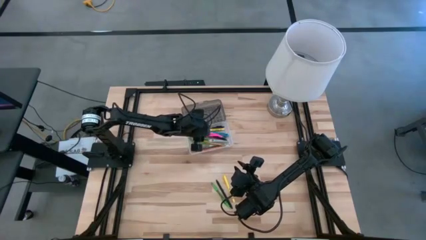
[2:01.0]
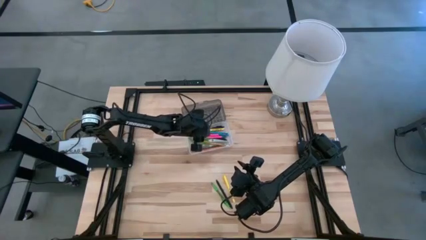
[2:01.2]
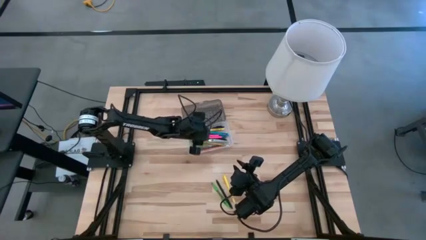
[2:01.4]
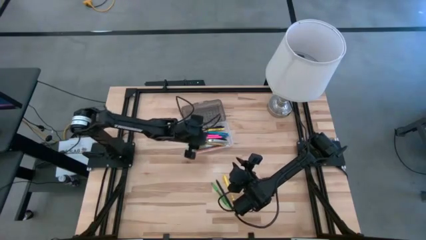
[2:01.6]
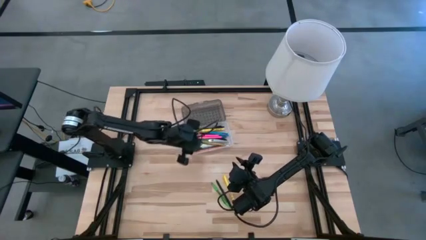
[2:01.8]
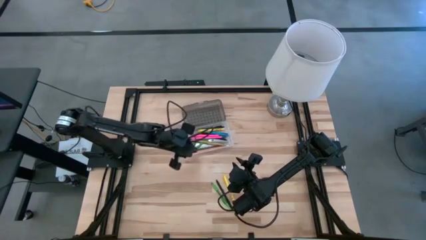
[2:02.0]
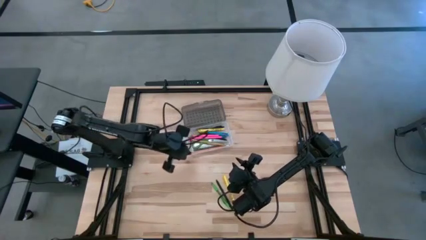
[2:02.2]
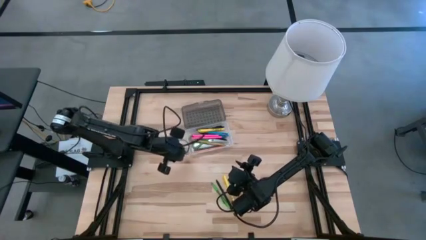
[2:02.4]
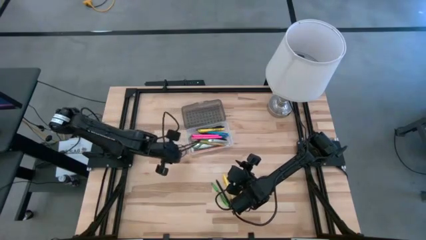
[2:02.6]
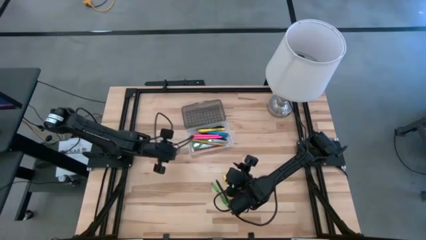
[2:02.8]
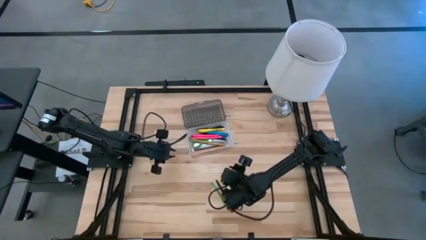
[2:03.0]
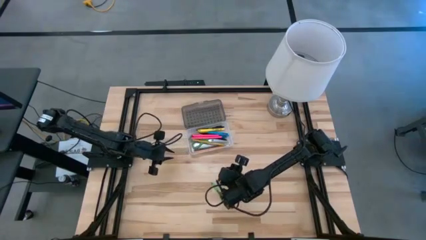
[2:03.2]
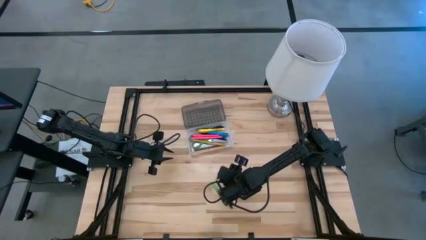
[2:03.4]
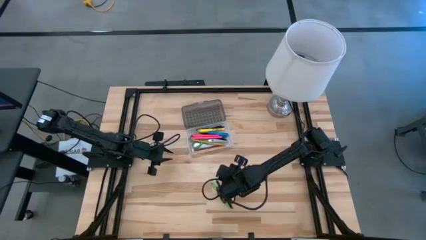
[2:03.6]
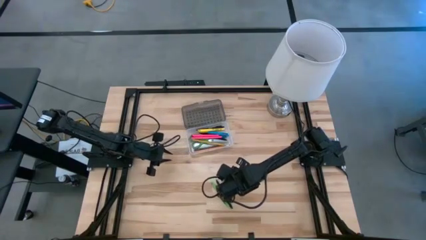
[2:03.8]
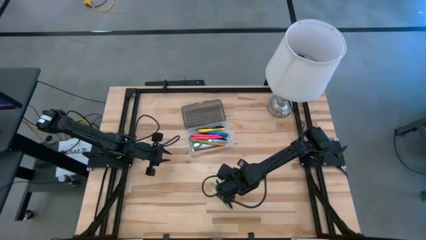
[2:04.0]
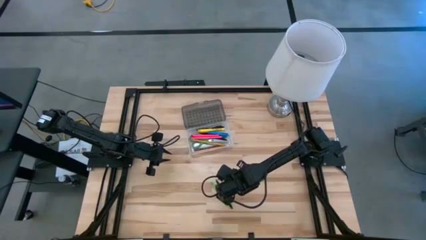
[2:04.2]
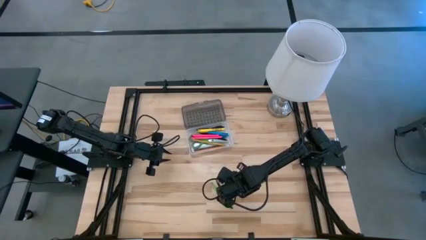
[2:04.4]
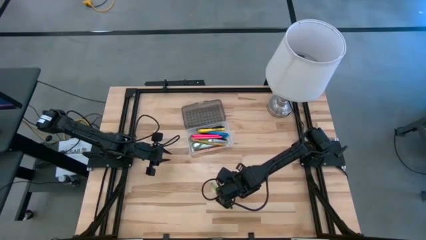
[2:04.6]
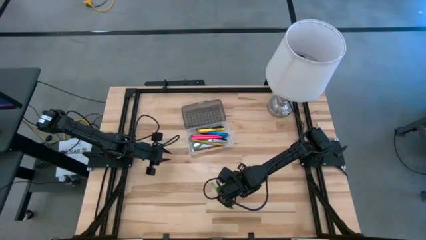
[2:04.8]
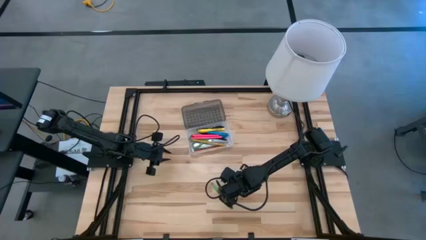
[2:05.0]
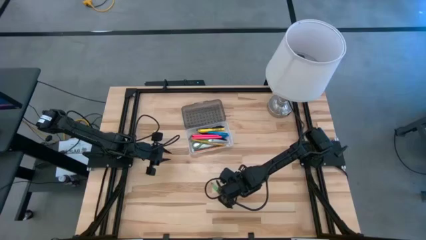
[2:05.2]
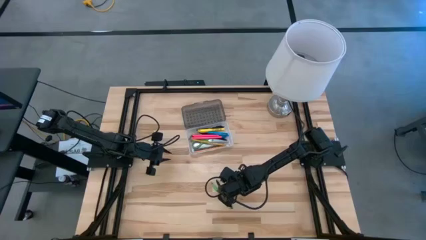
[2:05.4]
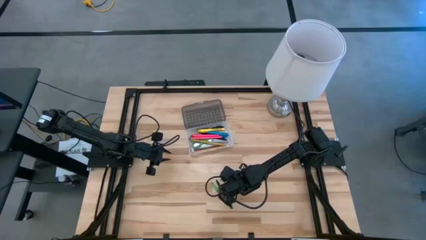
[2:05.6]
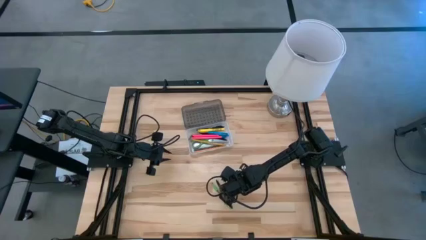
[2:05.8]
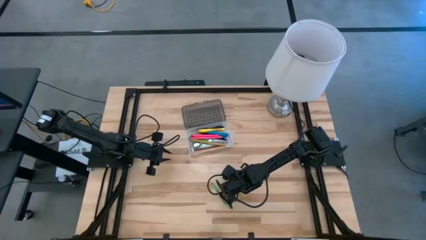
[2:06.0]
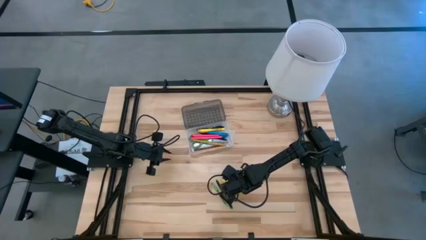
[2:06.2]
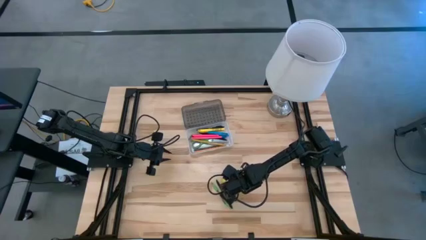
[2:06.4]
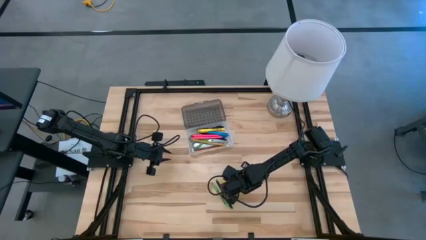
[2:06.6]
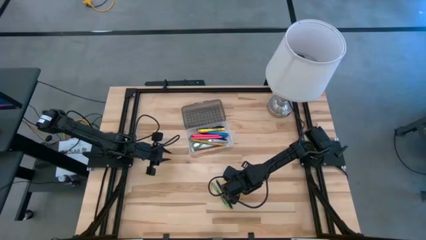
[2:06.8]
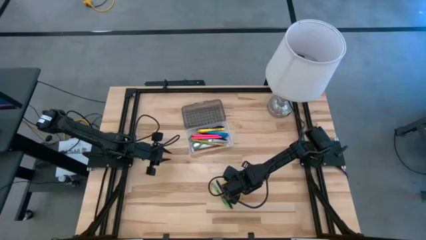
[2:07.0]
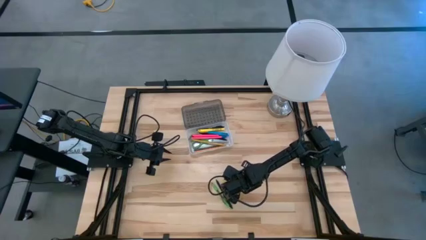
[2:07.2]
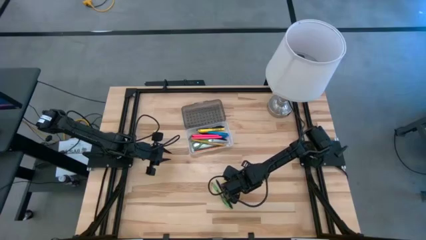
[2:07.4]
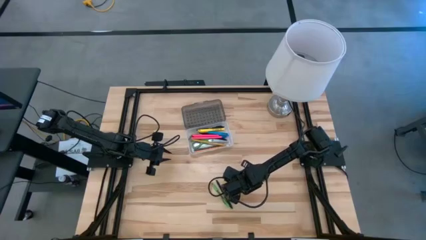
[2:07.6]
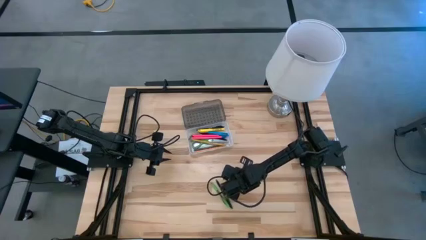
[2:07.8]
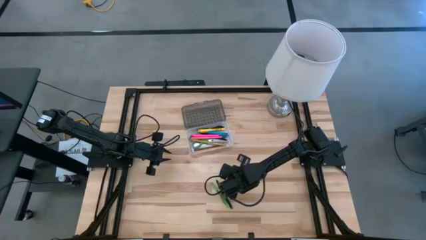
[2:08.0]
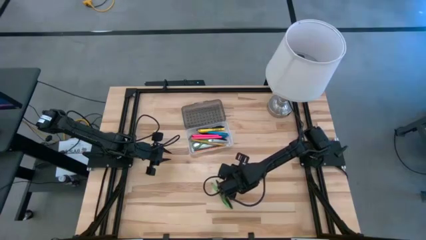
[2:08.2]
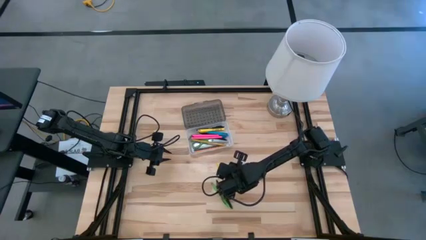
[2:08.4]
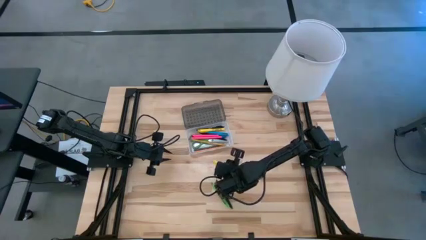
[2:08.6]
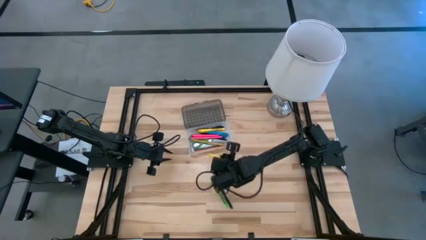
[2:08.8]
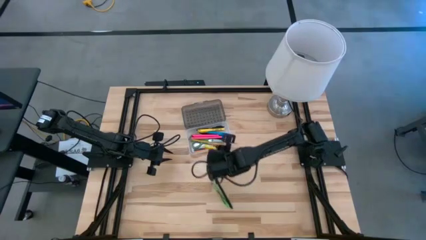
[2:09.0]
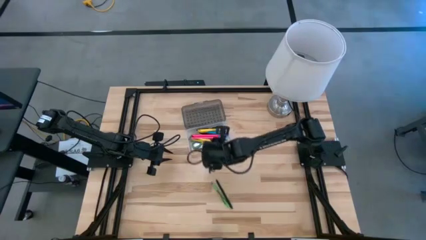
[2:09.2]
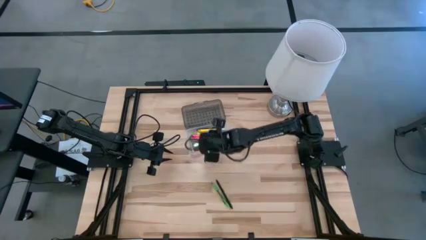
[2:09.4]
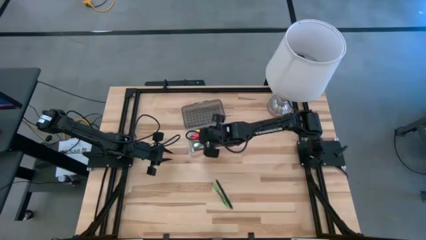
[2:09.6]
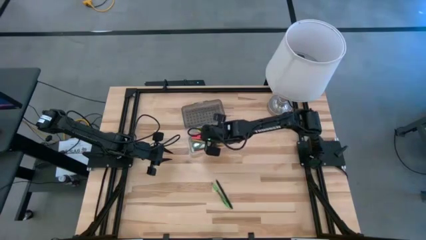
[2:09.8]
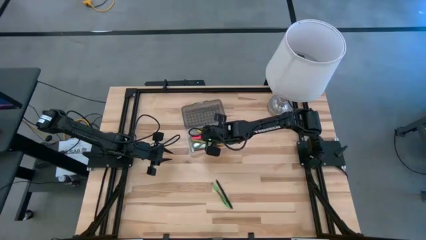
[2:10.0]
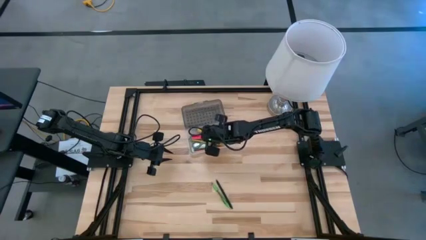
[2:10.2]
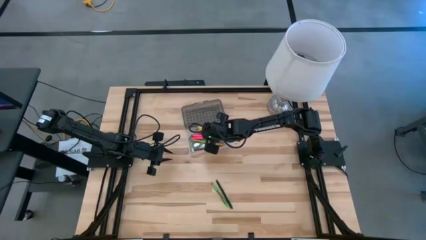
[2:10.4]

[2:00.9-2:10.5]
Task: Pick & place school supplies into a supply box
Put the yellow marker into the transparent supply box

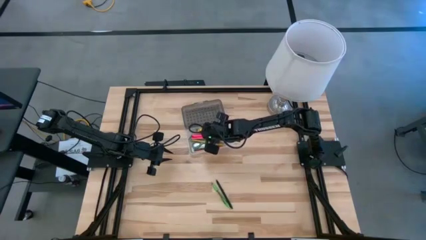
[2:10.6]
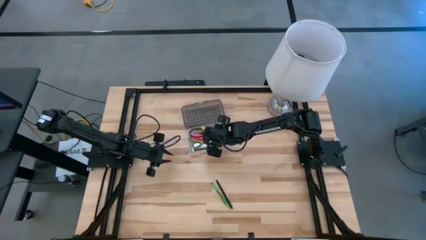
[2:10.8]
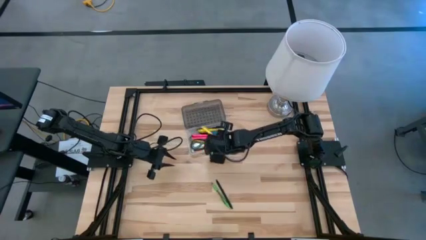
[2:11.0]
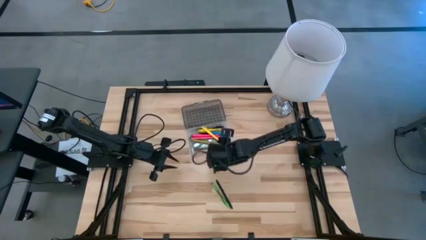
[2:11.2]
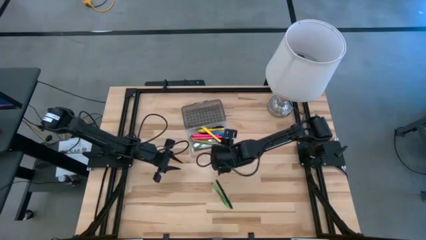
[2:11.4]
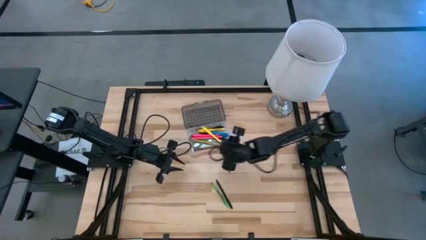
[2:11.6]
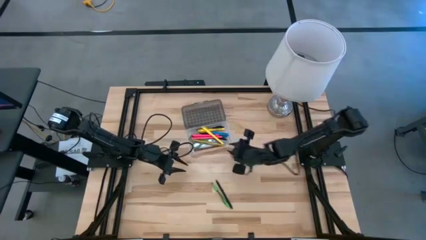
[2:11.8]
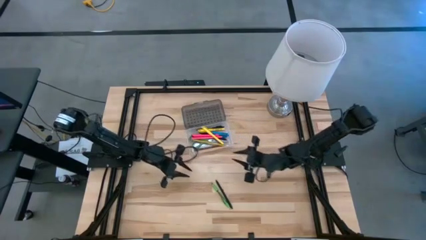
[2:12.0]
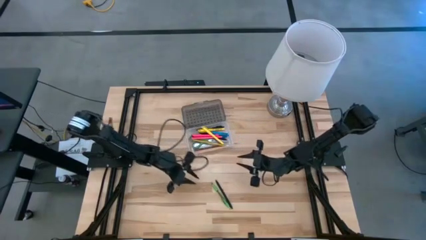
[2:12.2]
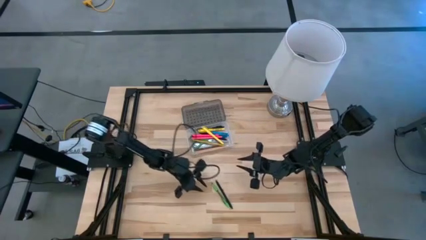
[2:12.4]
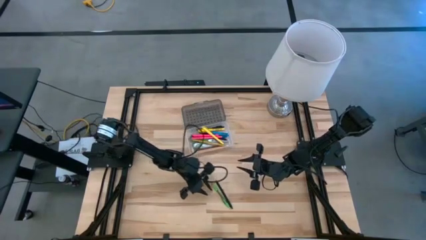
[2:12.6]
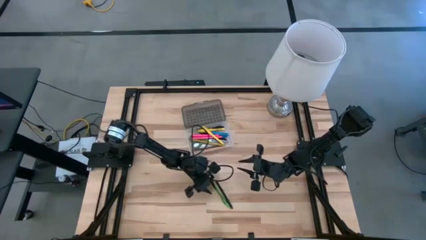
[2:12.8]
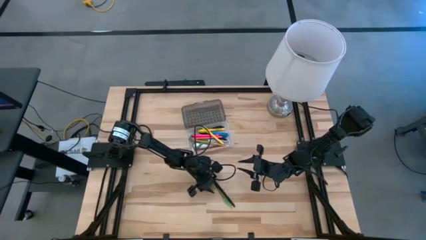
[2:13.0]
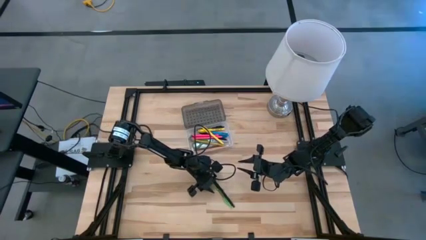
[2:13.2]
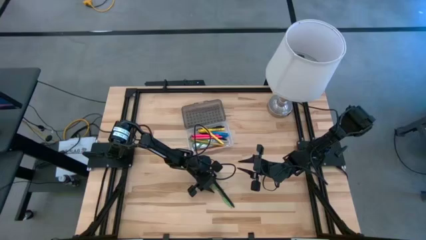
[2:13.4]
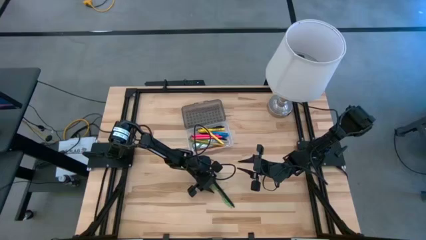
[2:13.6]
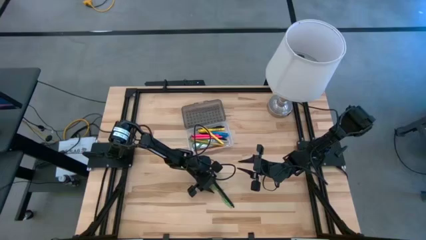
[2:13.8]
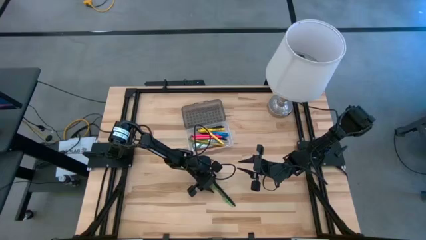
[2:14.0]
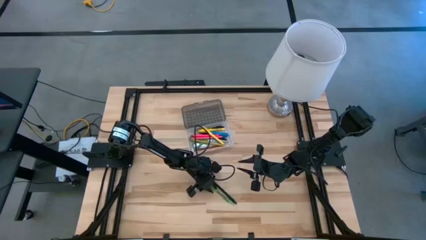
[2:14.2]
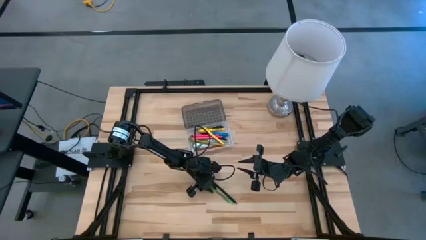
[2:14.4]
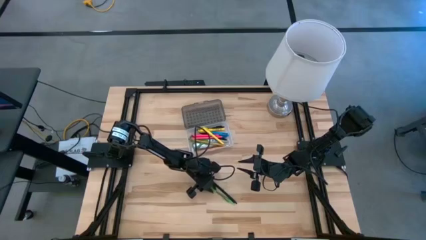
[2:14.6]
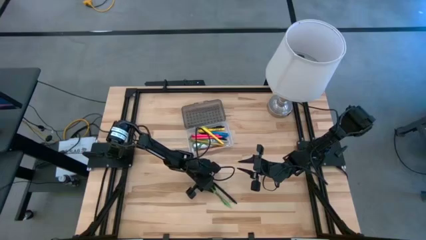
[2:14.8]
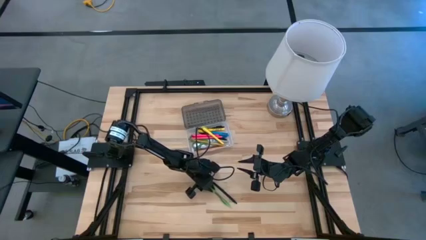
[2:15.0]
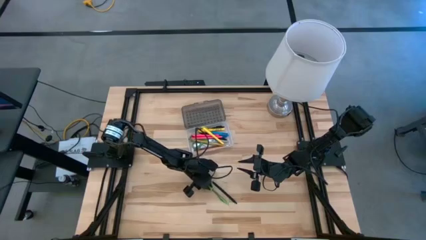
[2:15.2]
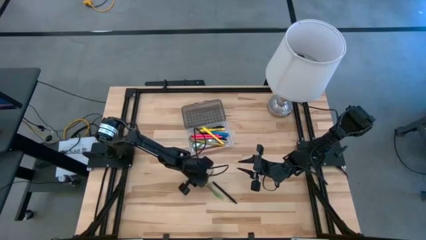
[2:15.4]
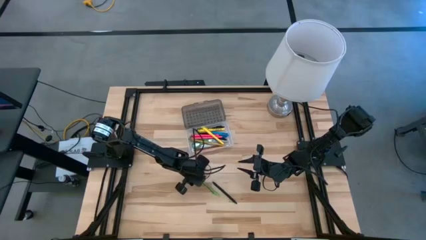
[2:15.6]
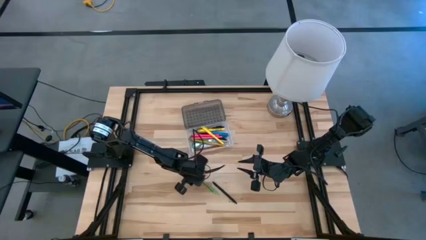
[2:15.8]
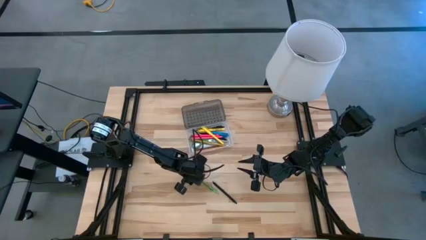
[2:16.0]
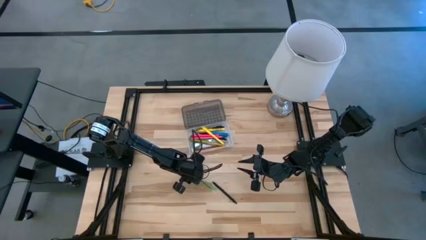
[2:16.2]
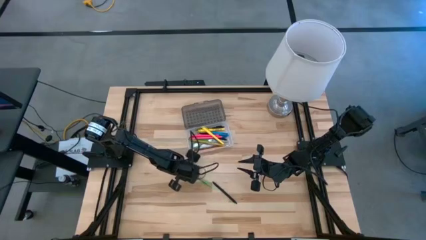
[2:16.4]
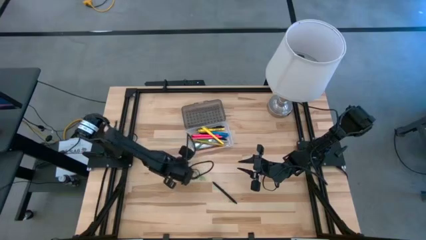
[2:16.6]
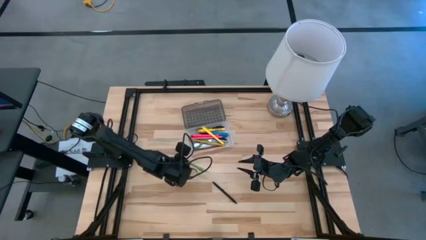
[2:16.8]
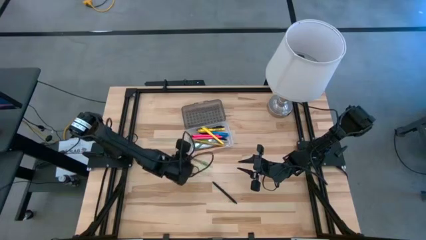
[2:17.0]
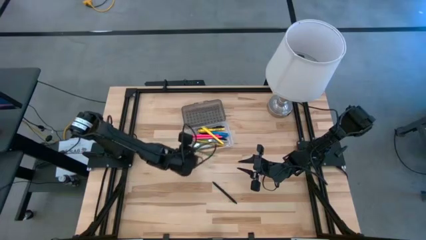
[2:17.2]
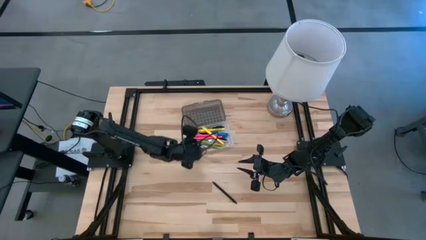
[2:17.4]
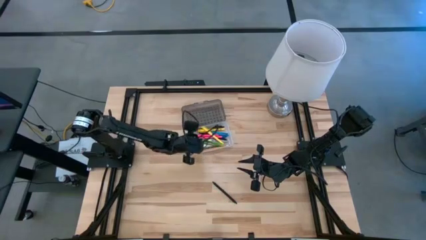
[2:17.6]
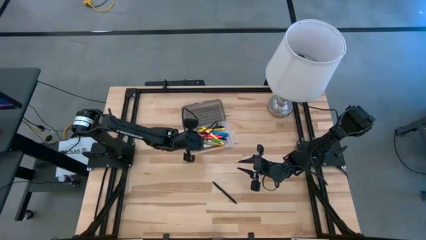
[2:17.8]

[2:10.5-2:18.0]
Put the green pen into the transparent supply box
